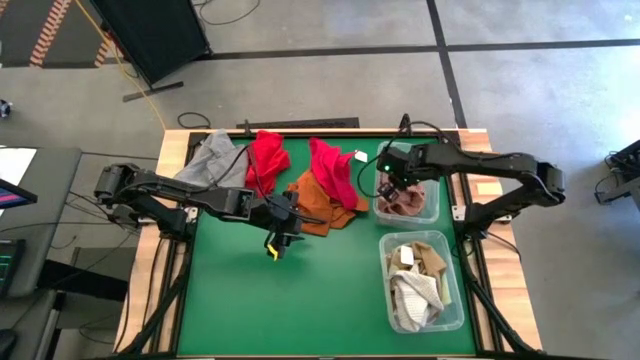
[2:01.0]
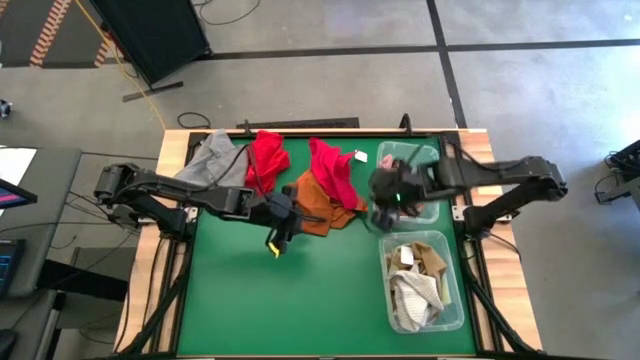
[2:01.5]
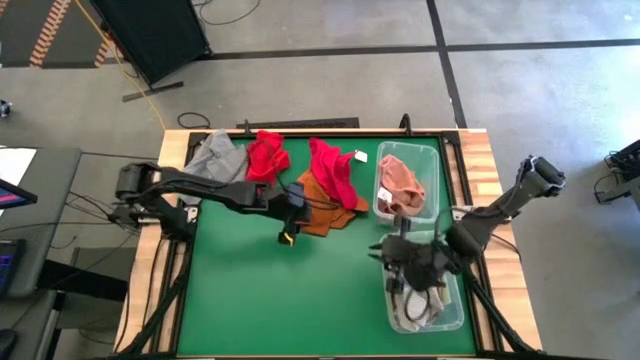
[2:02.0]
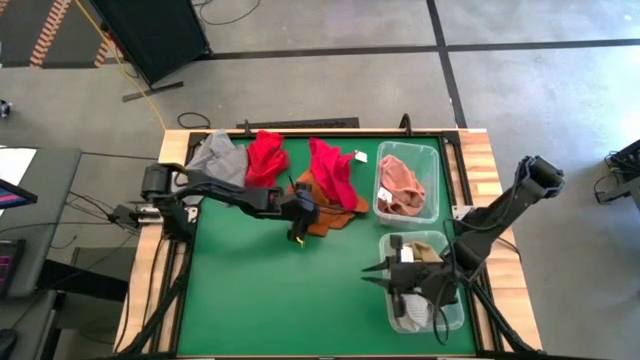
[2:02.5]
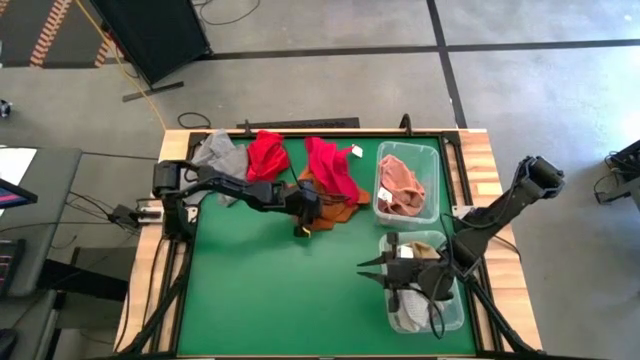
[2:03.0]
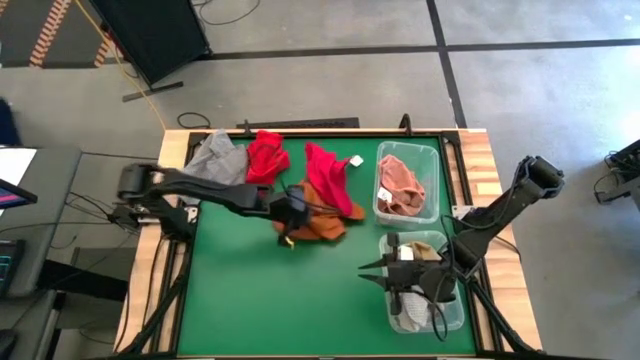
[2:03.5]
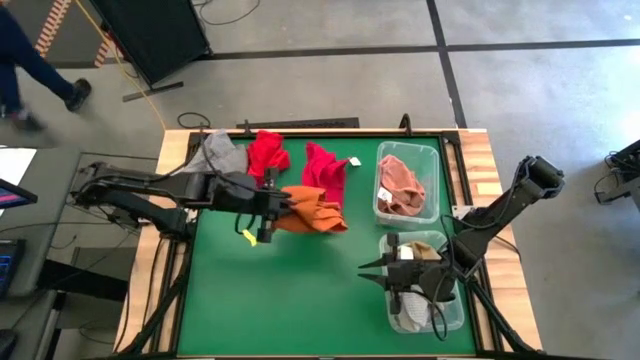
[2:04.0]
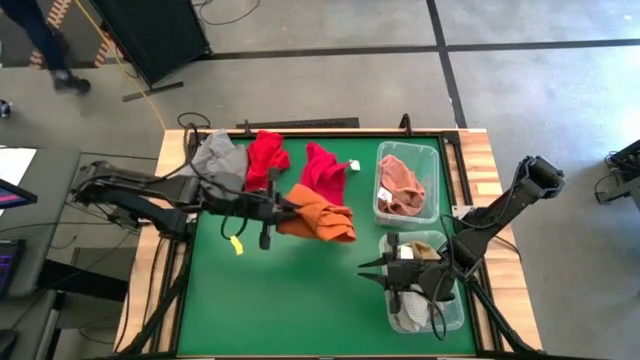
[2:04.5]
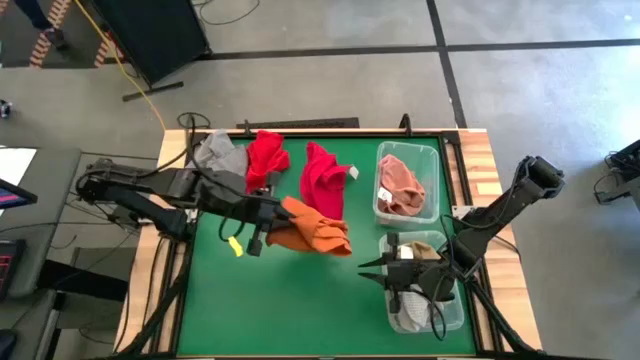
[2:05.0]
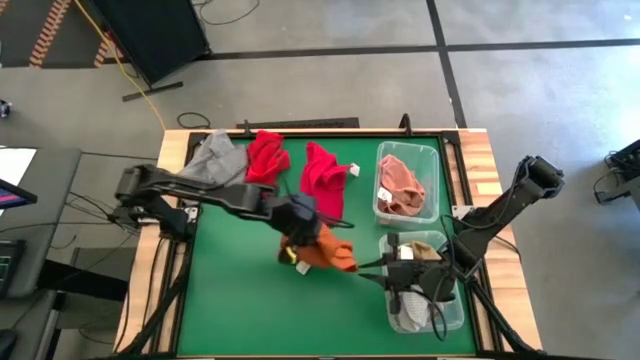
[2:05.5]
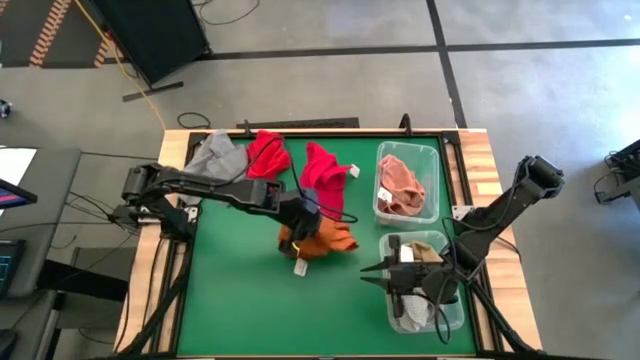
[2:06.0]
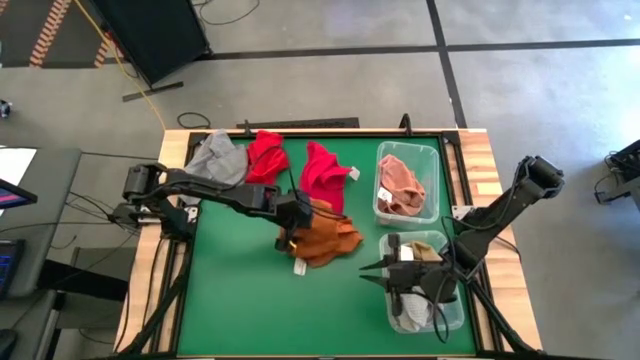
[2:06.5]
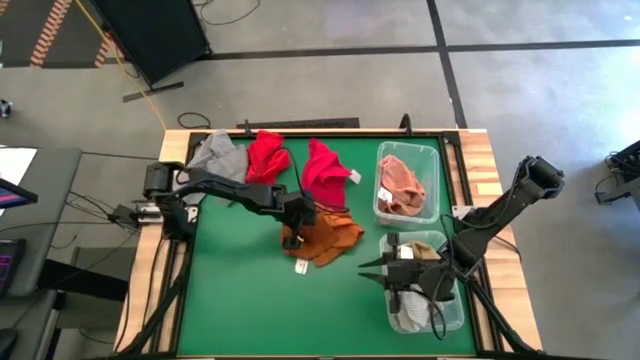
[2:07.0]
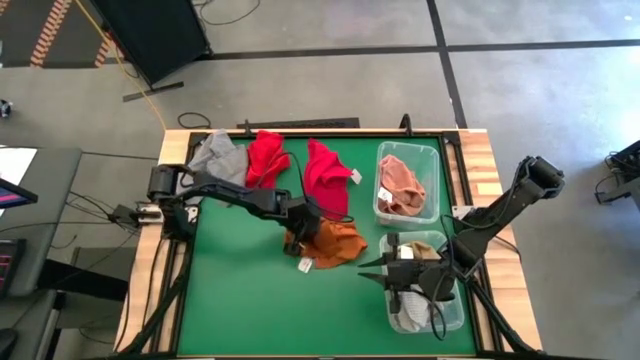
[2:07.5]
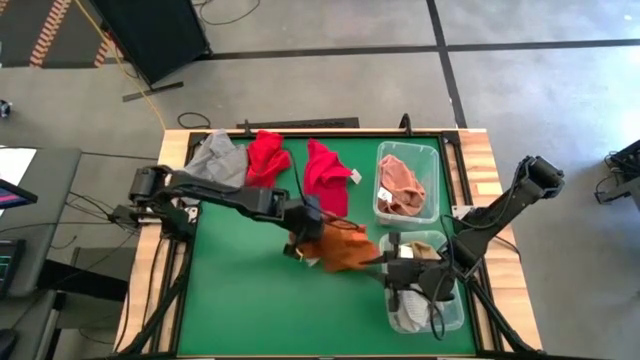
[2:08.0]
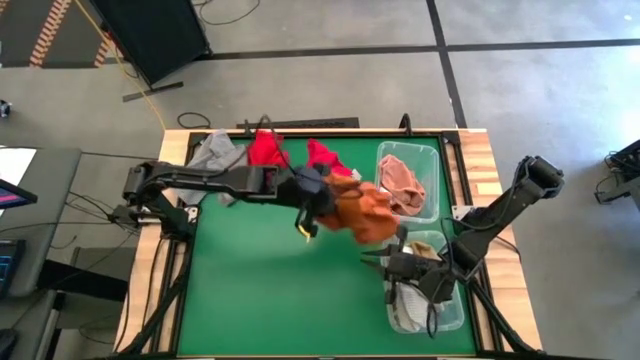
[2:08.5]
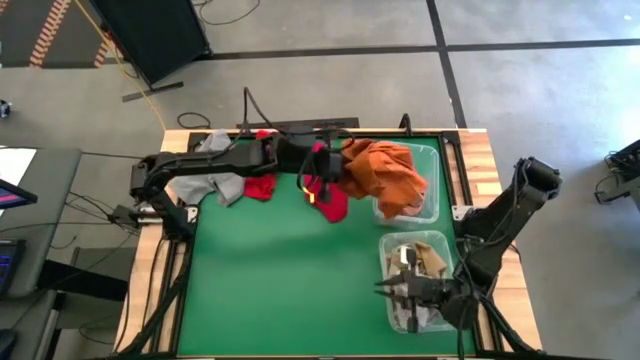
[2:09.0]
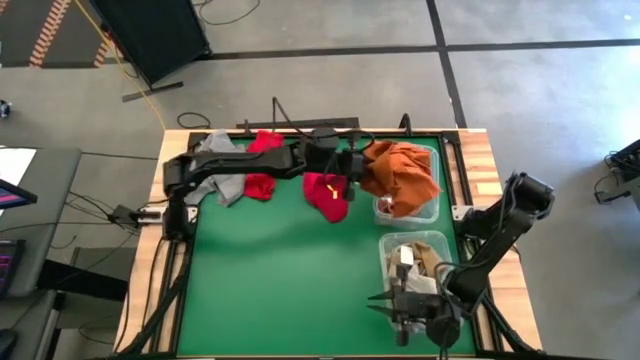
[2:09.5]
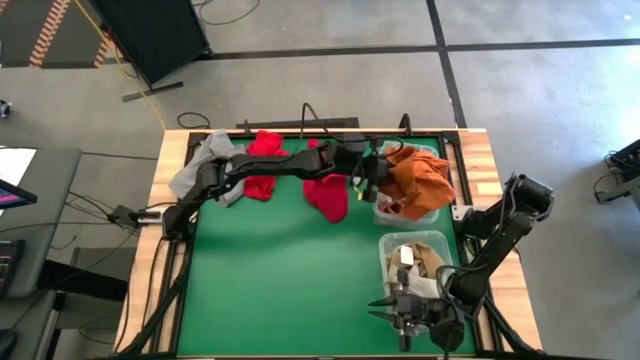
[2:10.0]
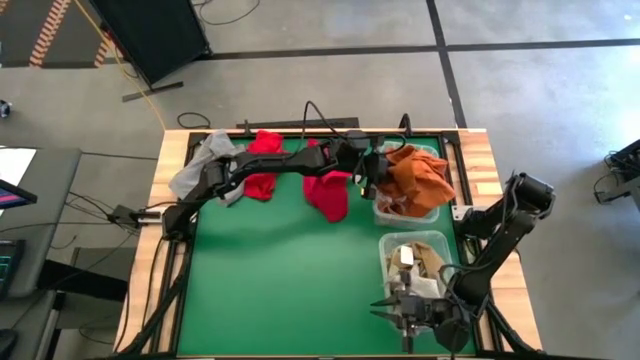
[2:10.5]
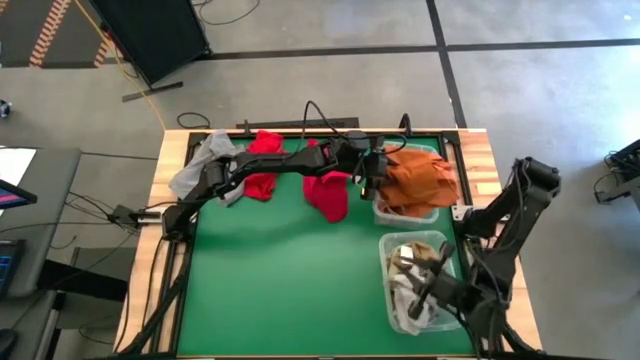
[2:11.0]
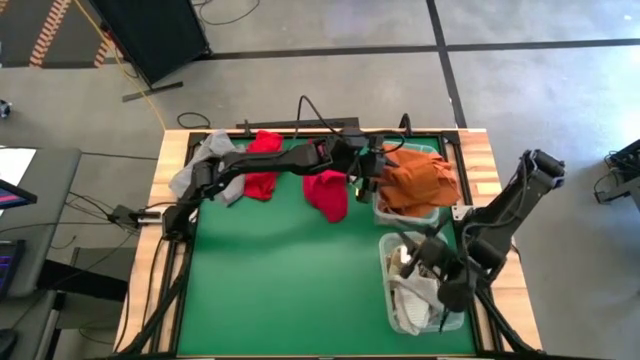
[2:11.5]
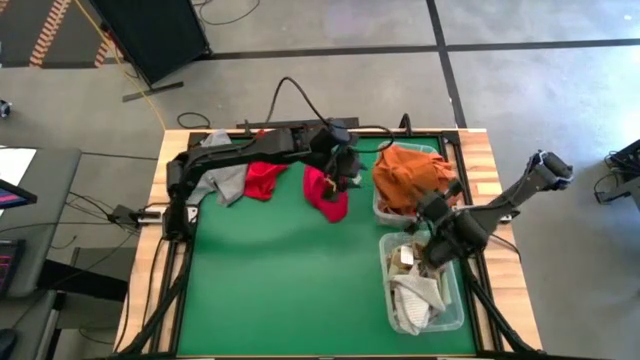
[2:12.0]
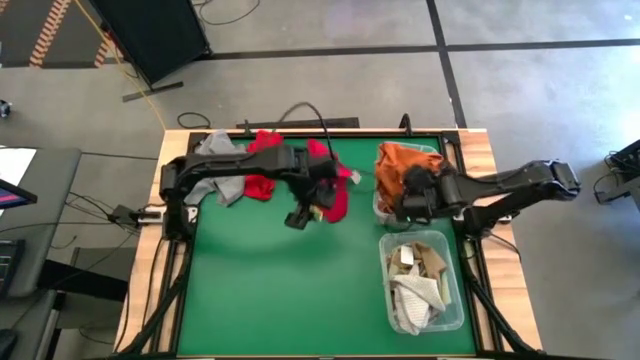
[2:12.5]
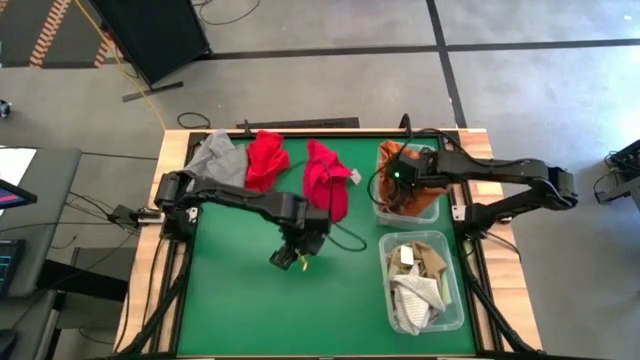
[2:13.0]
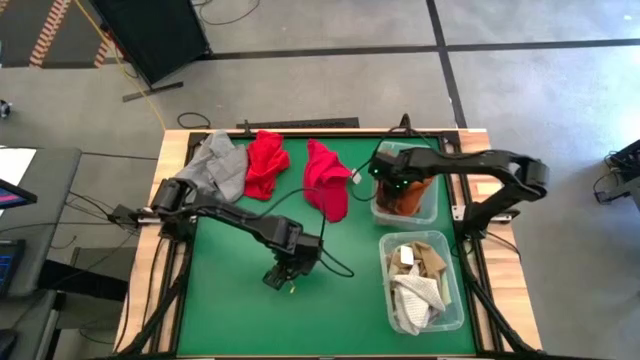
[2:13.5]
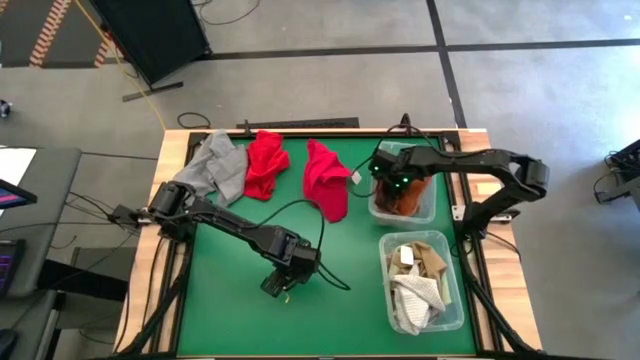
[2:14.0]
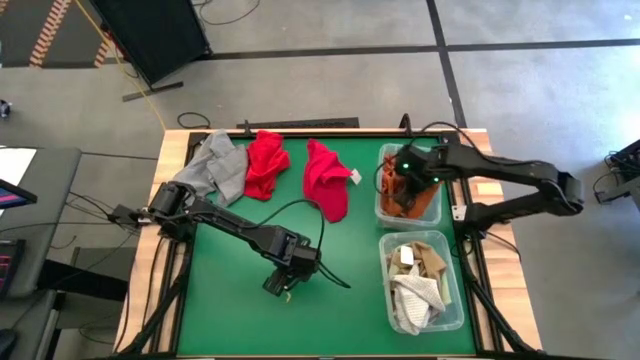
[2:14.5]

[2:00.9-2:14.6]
Task: Sort towels by color in basket
Put the orange towel into the top transparent bin

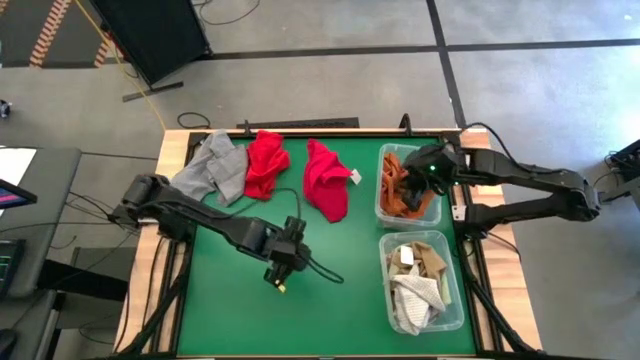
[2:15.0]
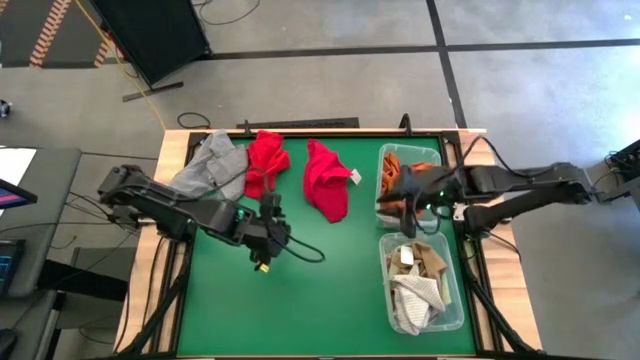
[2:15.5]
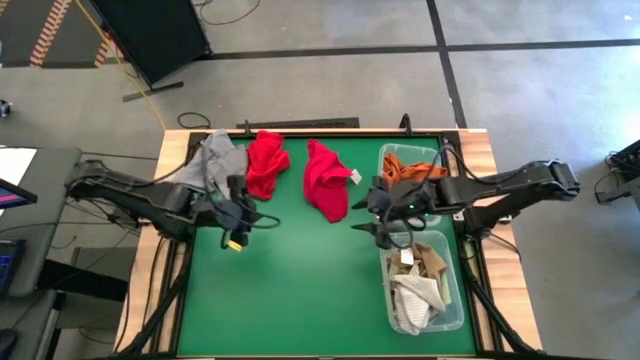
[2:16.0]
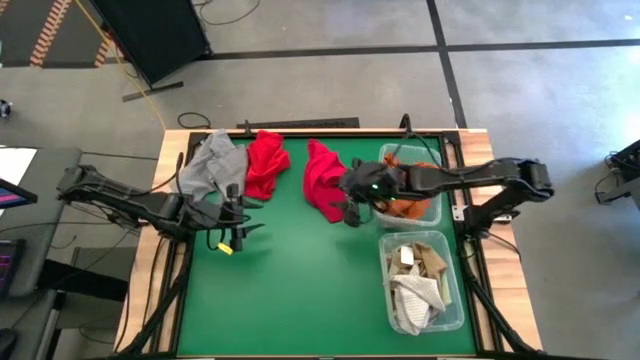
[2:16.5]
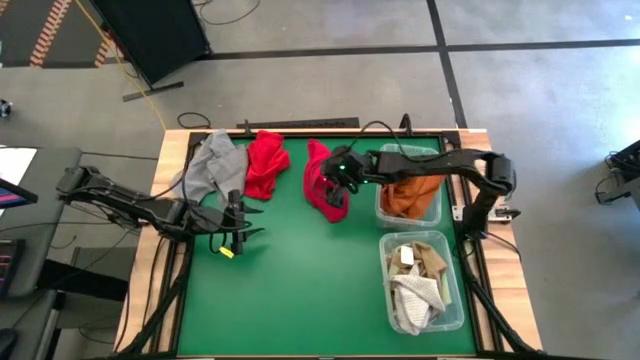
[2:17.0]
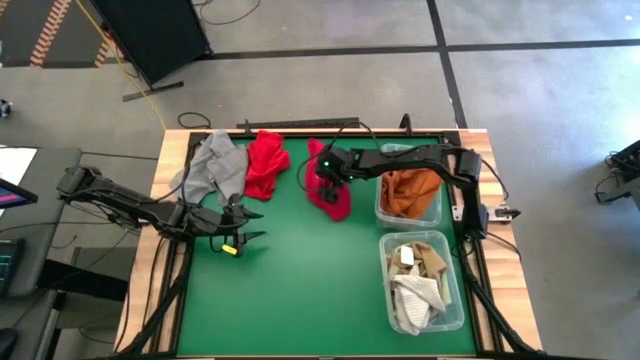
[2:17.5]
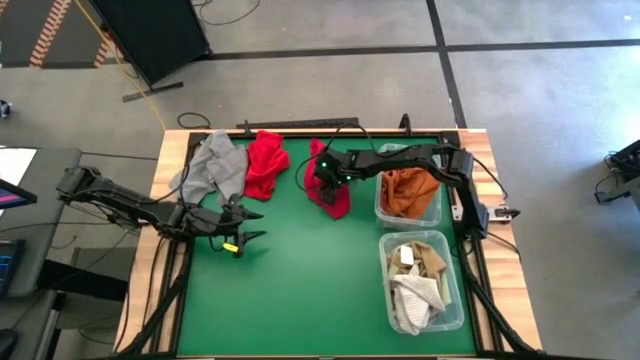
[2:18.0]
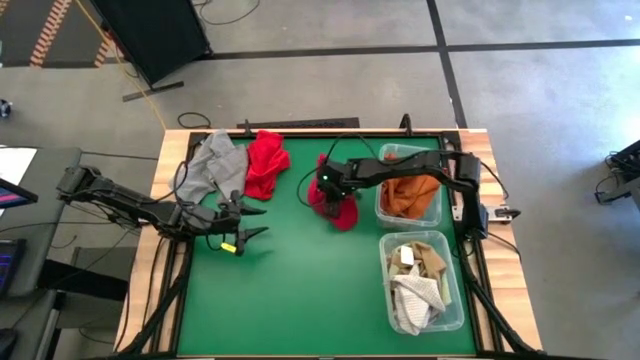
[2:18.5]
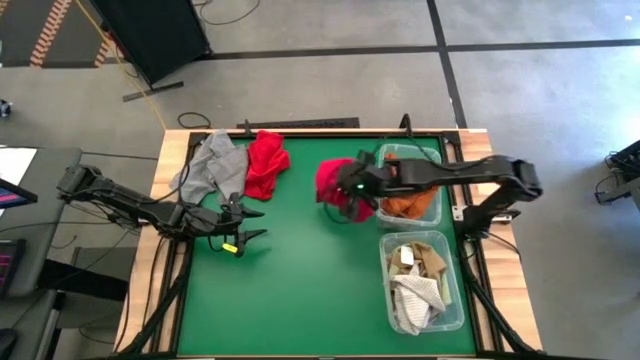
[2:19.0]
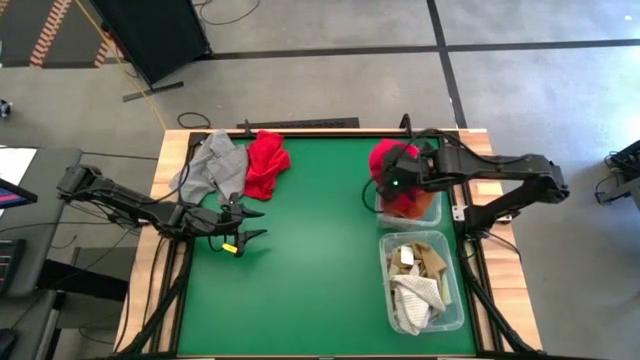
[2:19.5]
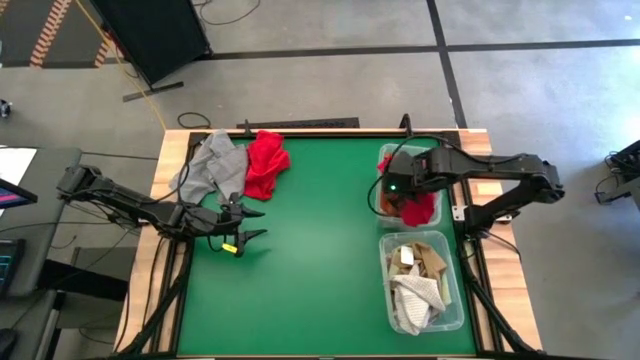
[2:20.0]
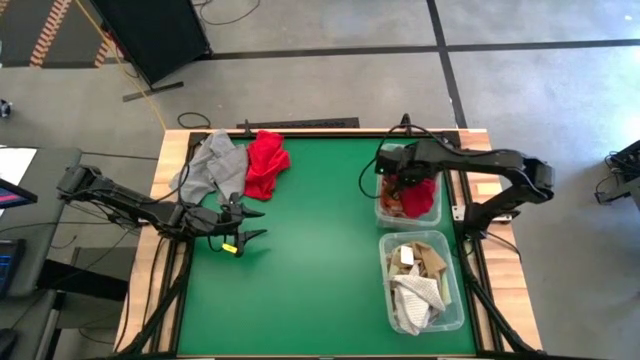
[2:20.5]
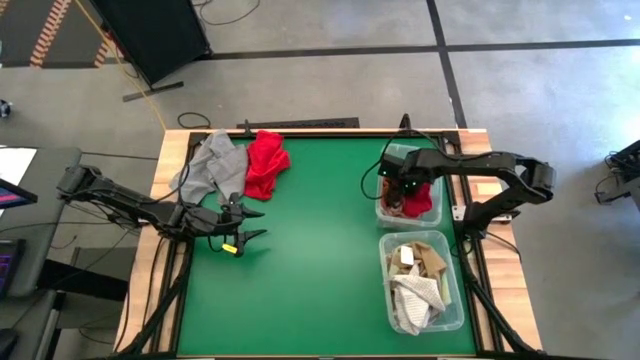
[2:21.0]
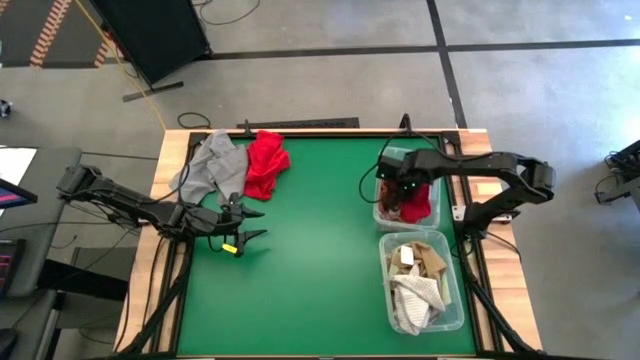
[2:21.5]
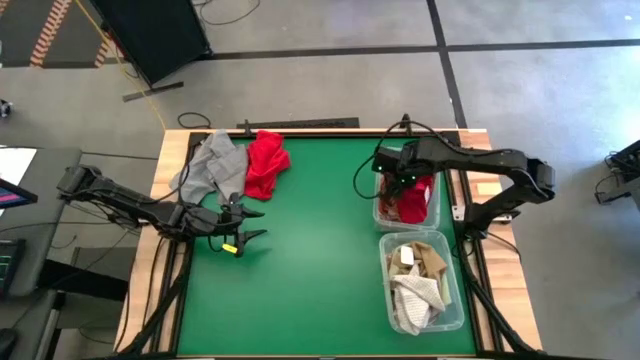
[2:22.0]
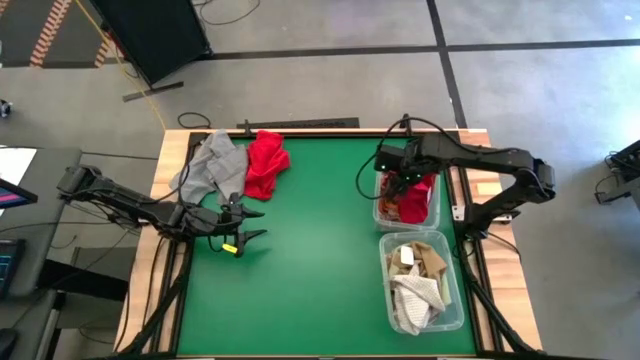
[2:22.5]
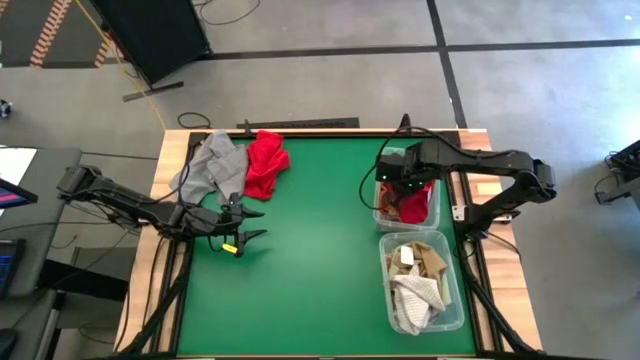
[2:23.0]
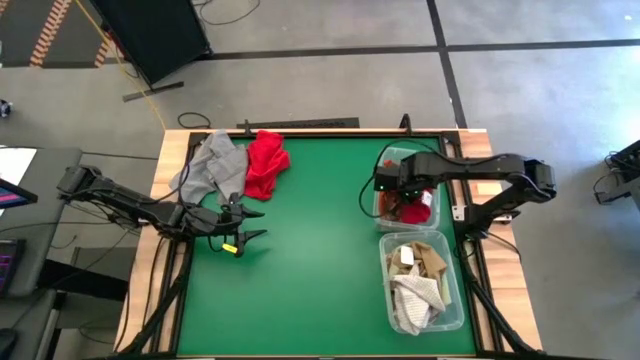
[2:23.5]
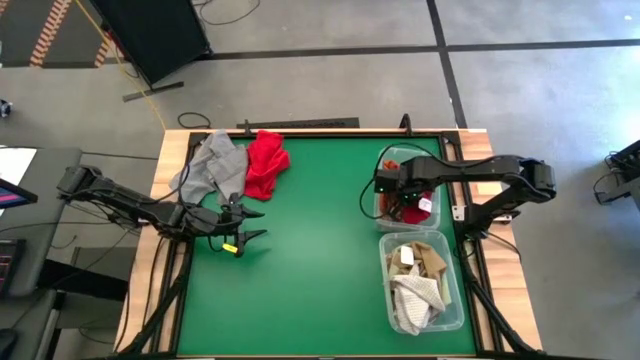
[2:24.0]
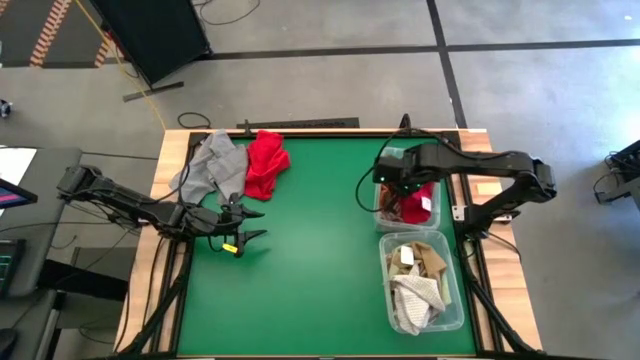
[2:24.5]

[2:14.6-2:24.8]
Put the right red towel into the top transparent bin
